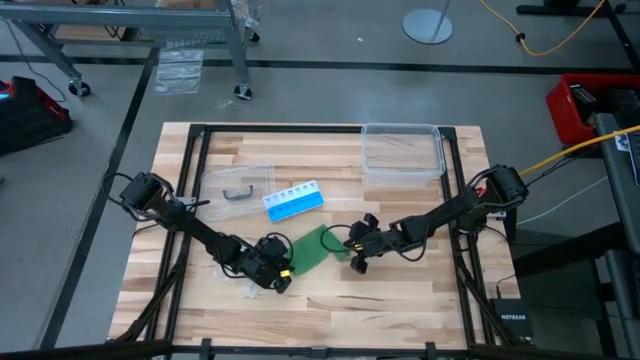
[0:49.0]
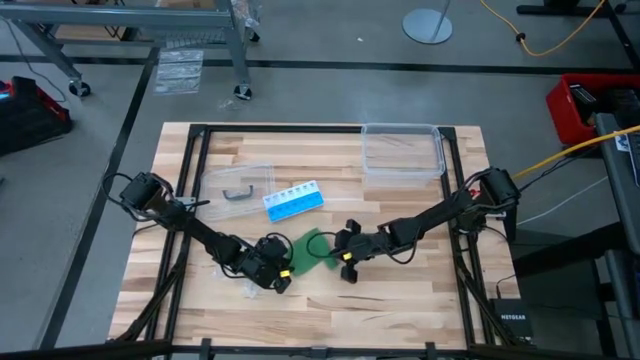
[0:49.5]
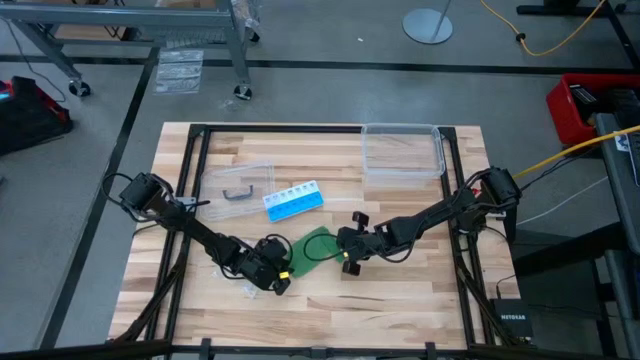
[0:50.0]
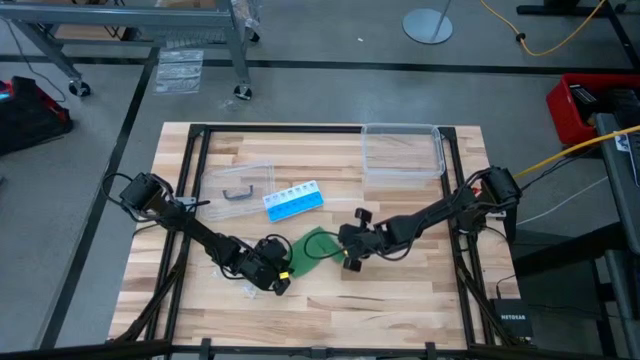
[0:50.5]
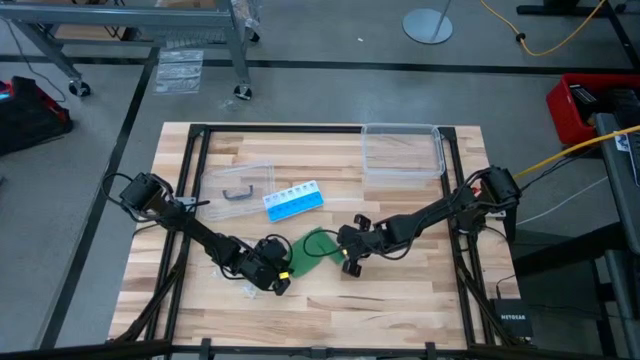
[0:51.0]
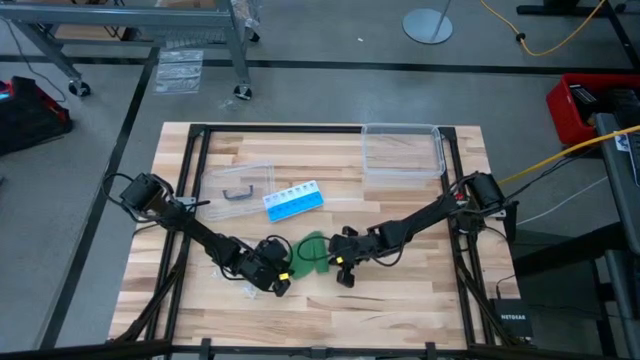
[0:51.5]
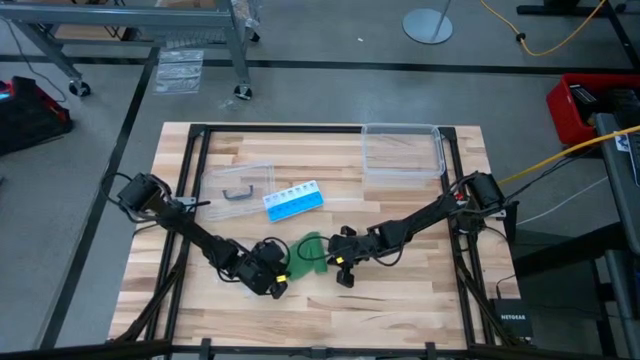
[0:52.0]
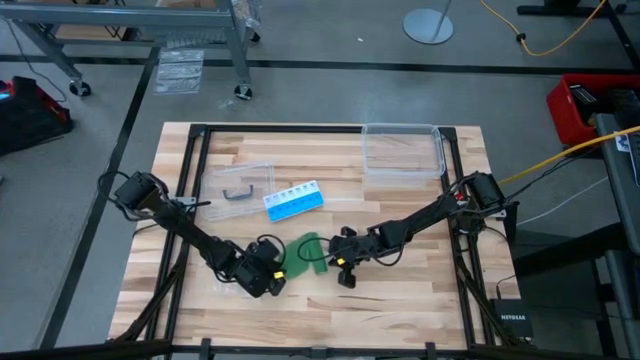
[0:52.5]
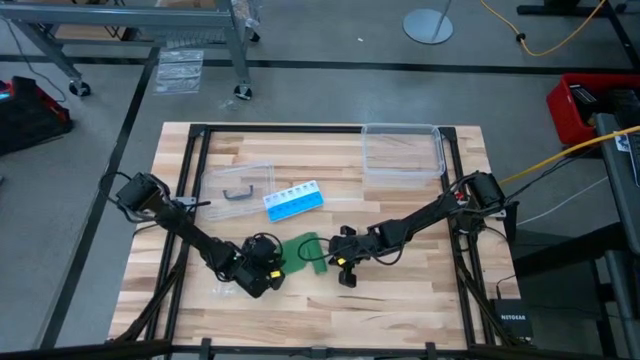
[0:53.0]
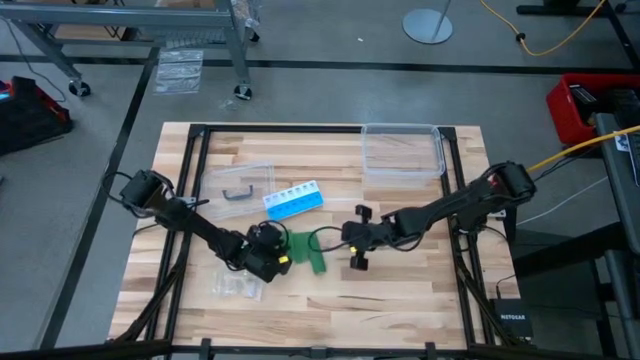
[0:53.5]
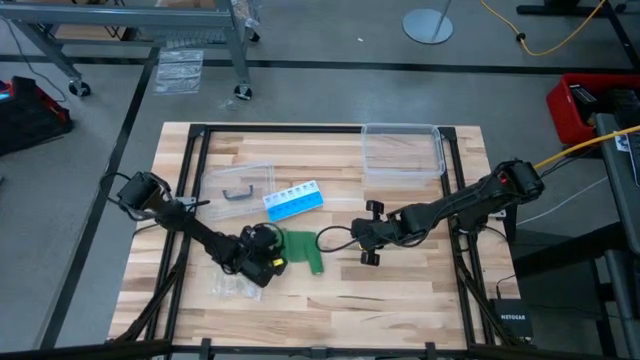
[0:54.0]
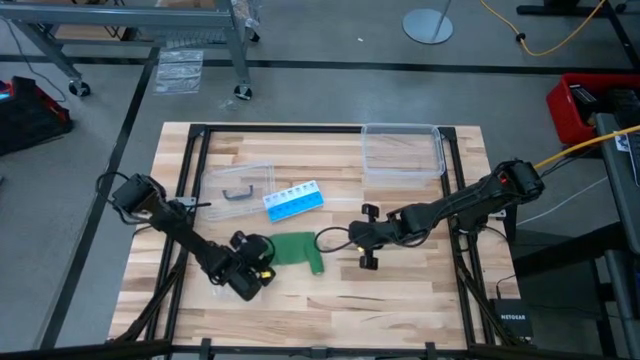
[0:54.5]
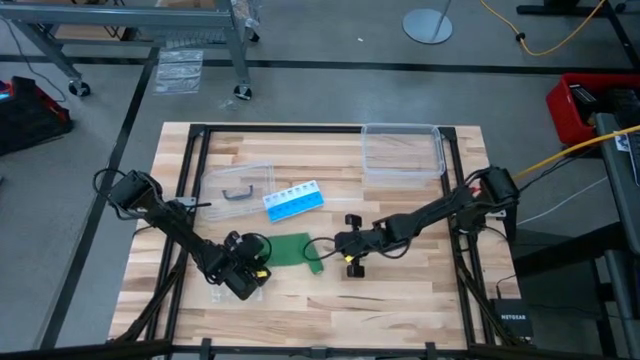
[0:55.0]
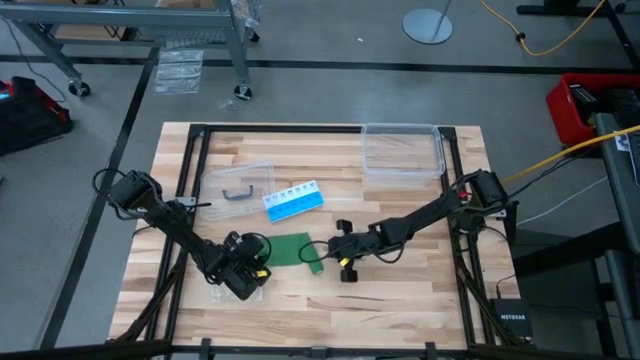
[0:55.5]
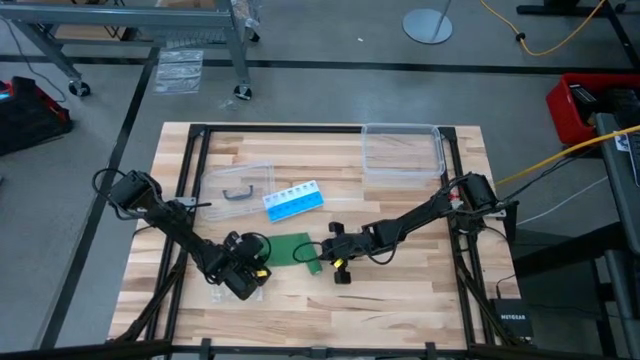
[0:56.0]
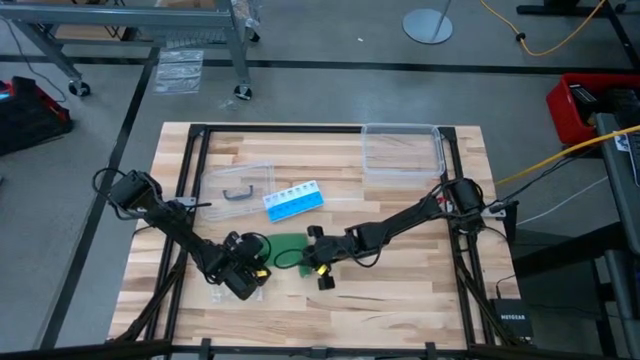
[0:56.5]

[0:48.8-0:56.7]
Task: Roll bandage
Roll the green bandage

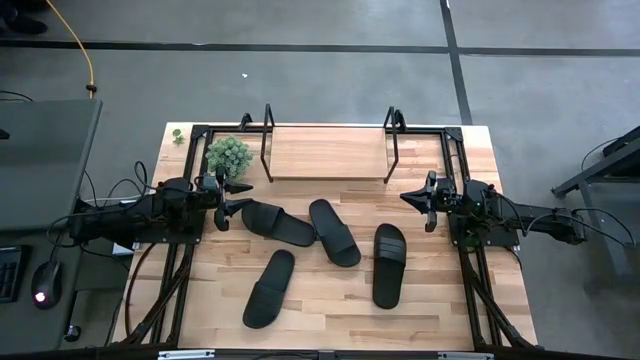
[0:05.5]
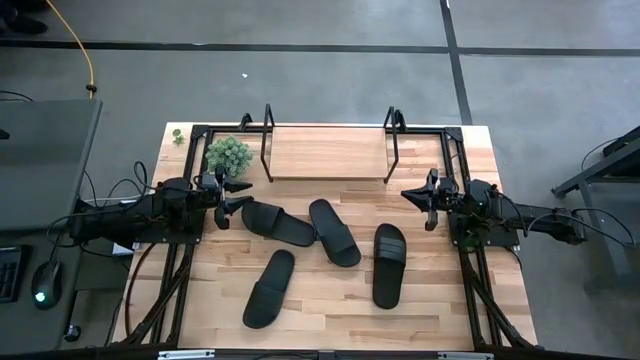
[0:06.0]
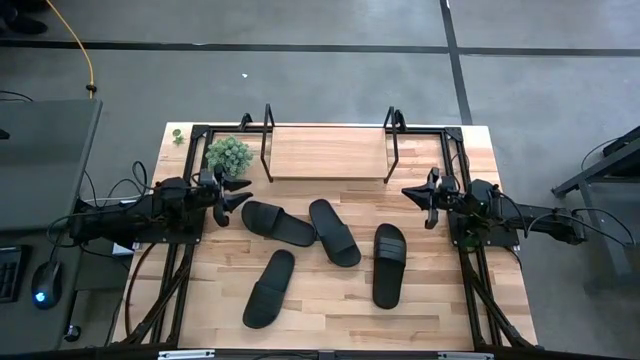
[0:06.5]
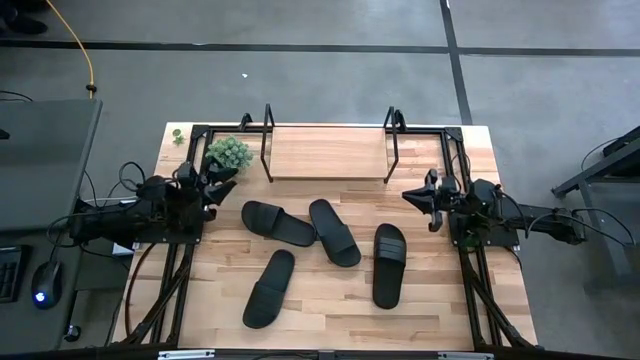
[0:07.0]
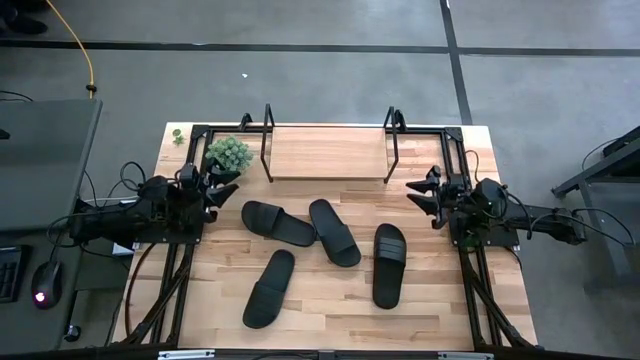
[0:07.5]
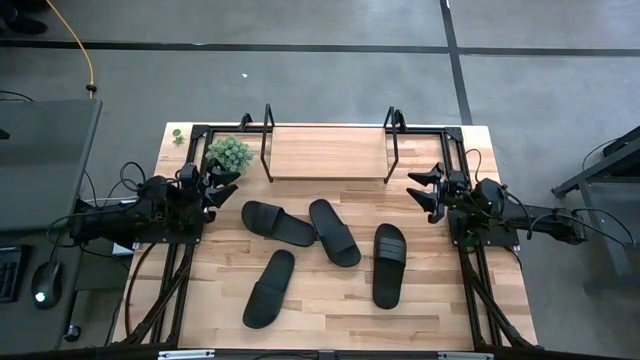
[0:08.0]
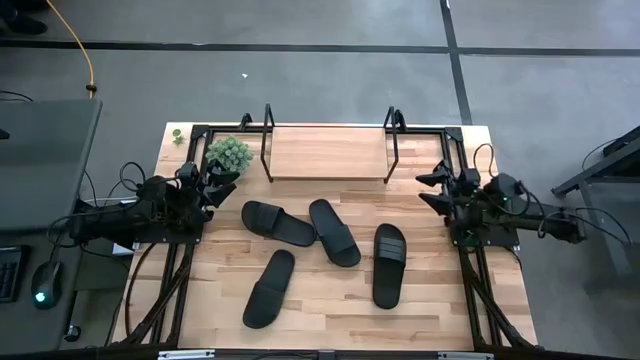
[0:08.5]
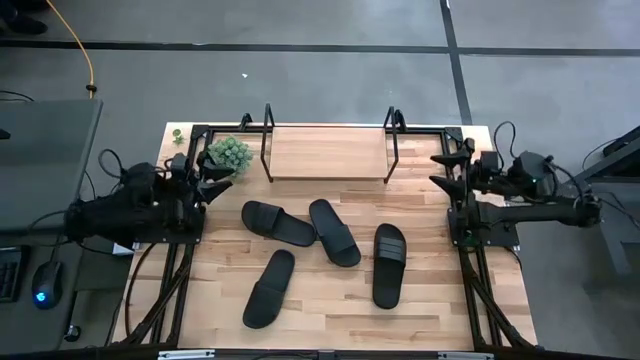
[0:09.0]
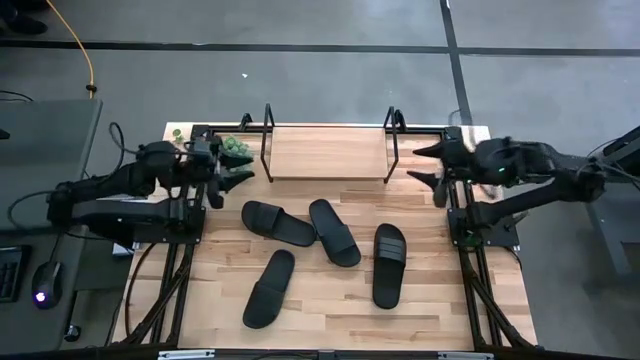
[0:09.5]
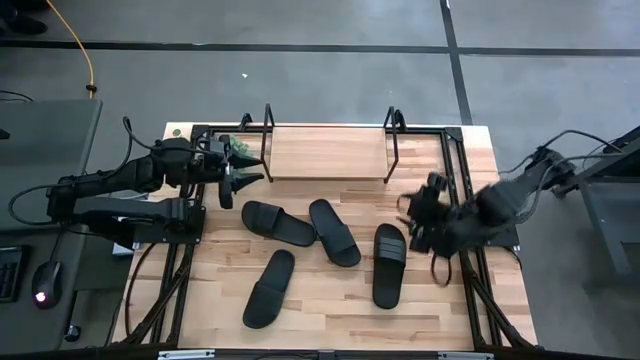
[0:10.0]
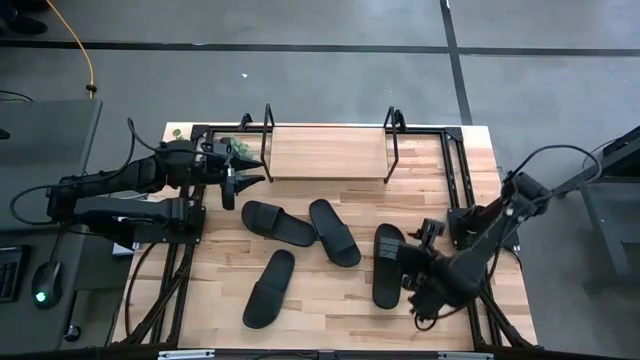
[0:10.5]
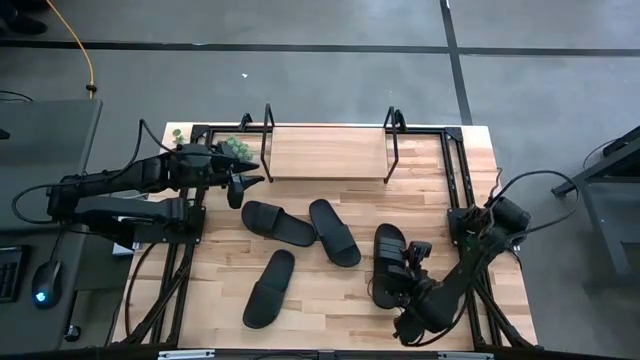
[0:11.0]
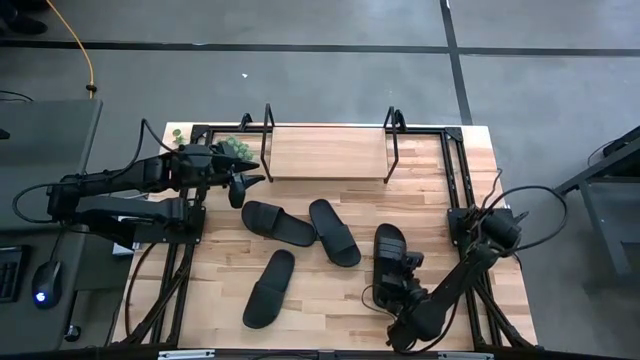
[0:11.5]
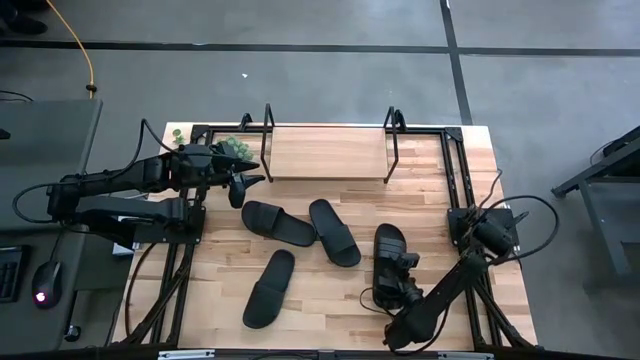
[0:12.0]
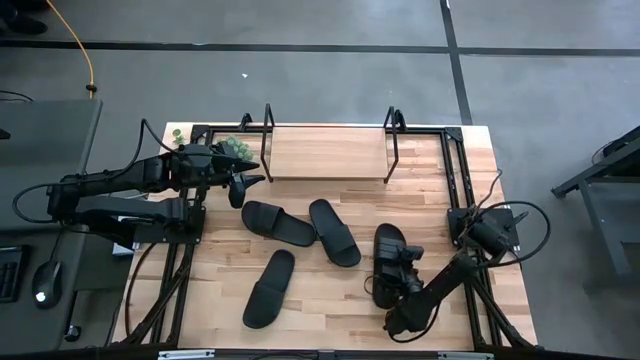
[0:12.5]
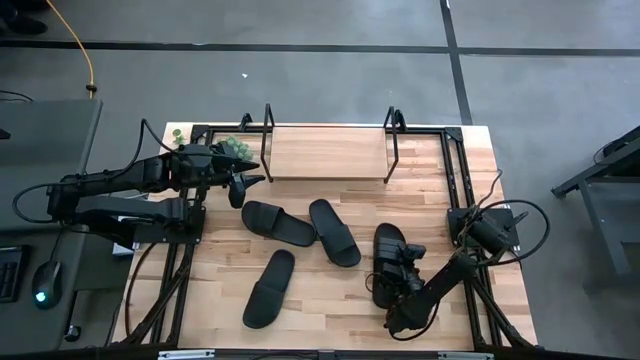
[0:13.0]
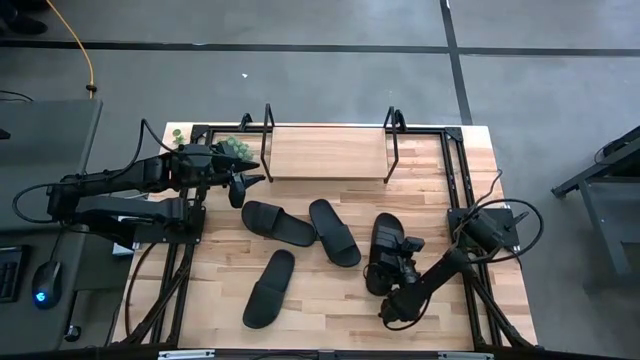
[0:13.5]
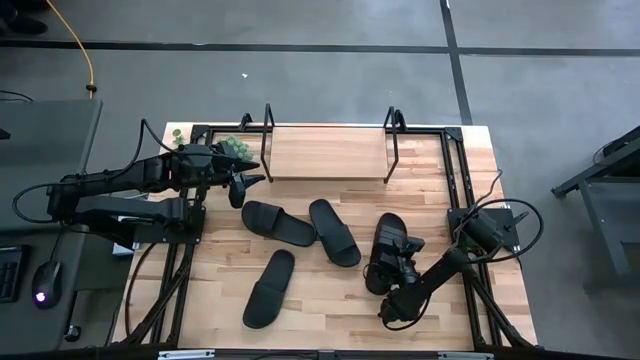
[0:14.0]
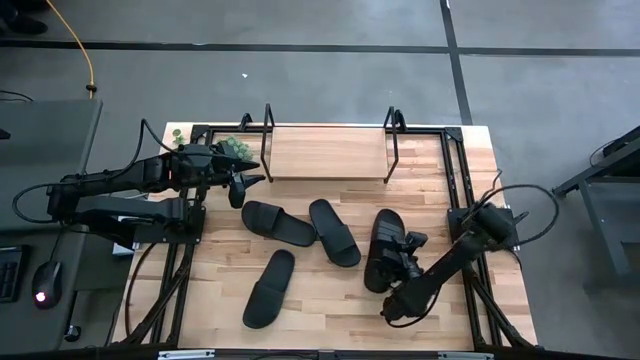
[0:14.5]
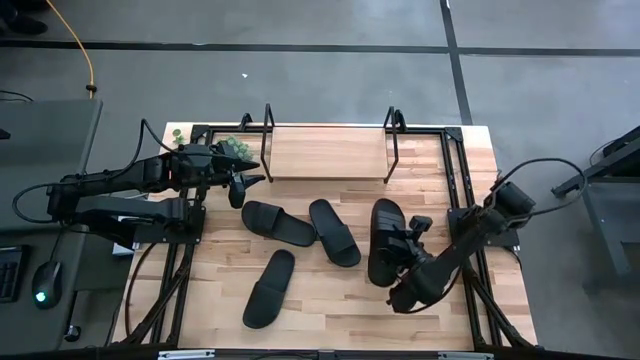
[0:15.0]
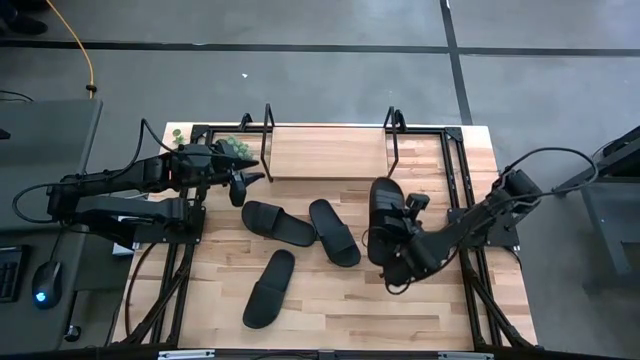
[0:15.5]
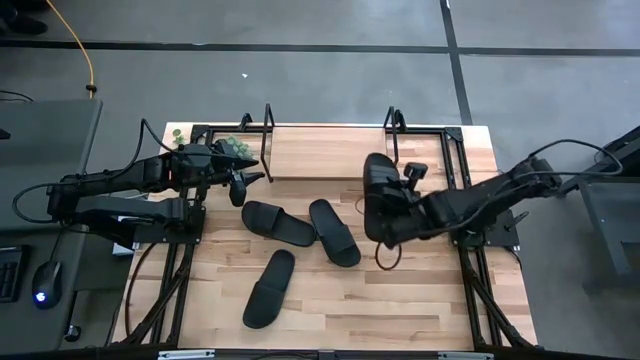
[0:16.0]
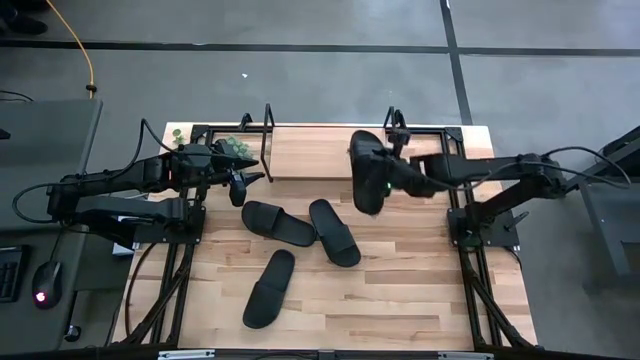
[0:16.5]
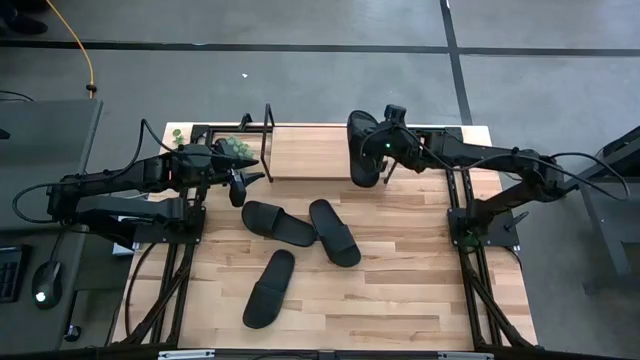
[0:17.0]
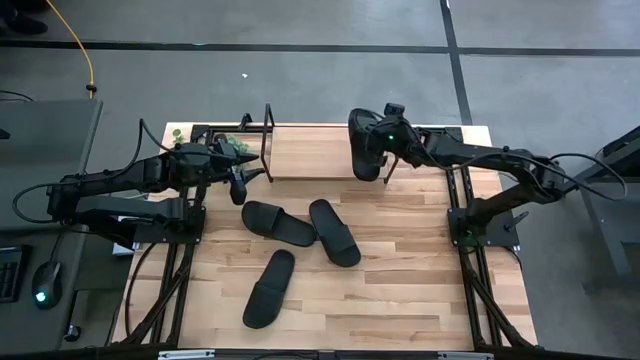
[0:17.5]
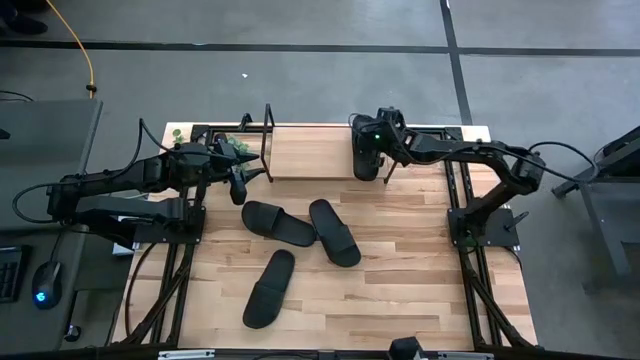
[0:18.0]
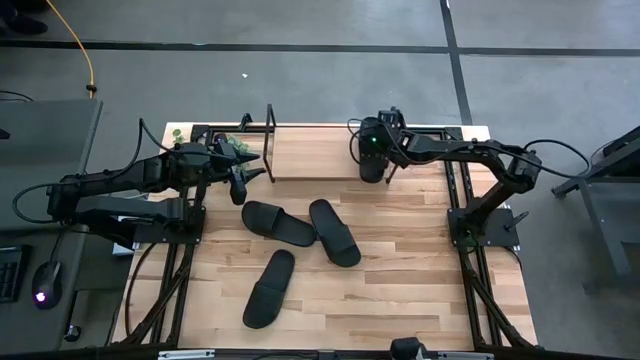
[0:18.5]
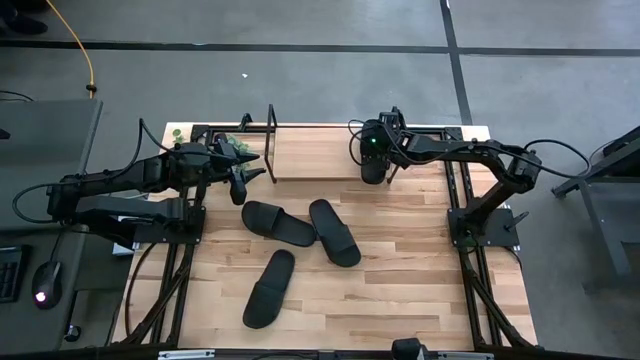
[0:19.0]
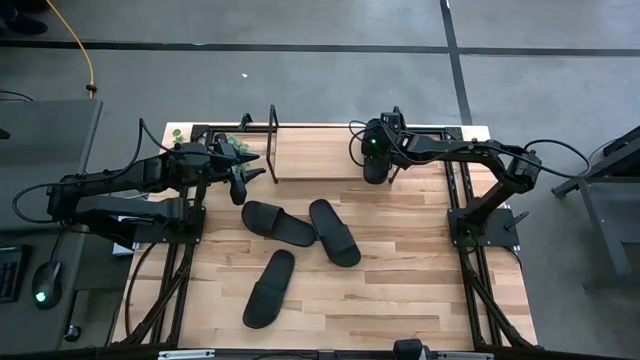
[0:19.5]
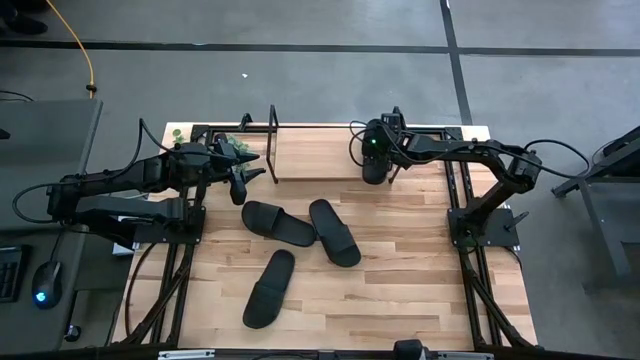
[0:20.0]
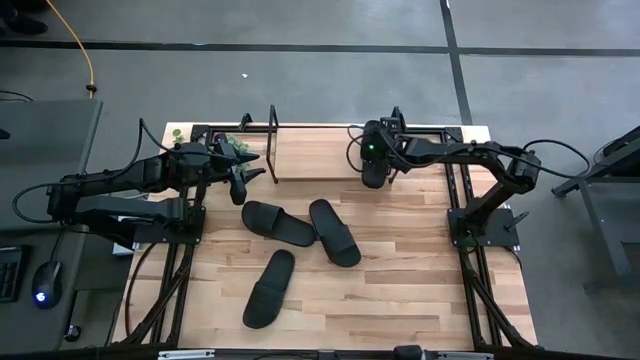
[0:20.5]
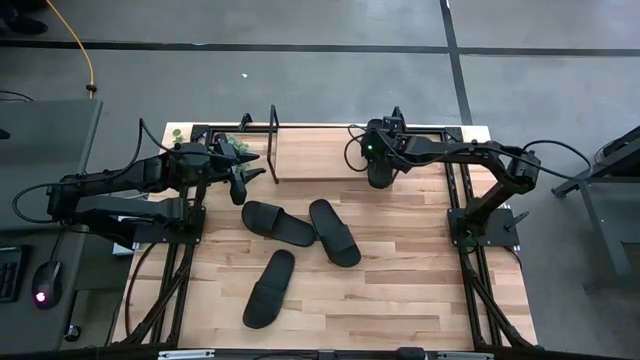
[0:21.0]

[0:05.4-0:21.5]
Task: Pick and place slides into the shelf
Put the black slide on the shelf
